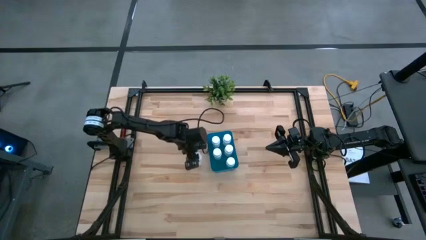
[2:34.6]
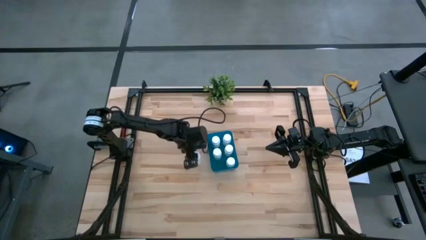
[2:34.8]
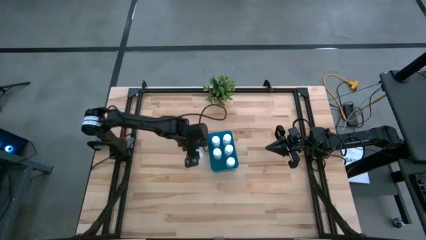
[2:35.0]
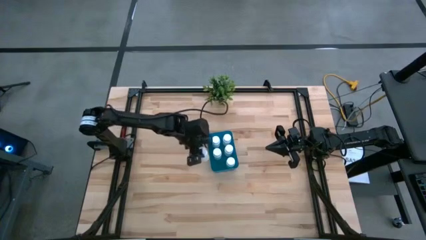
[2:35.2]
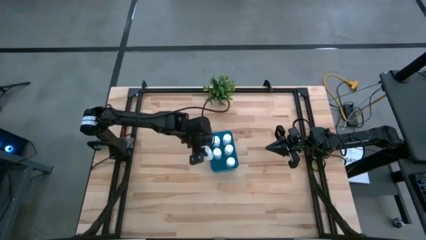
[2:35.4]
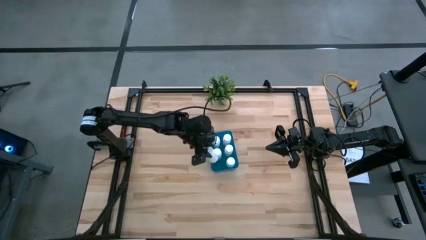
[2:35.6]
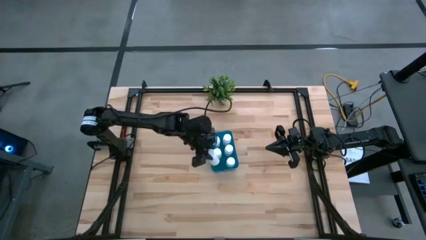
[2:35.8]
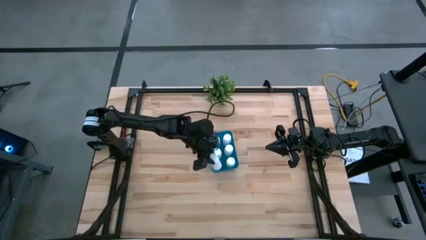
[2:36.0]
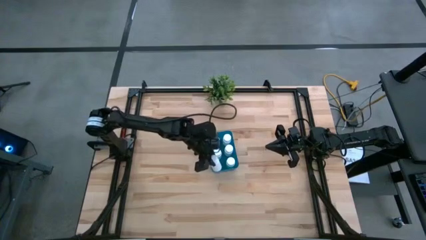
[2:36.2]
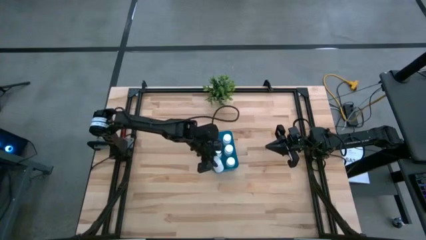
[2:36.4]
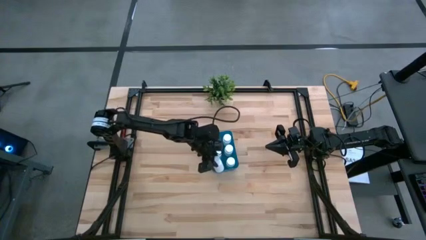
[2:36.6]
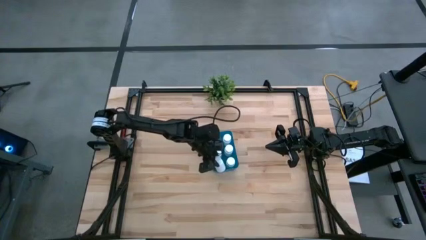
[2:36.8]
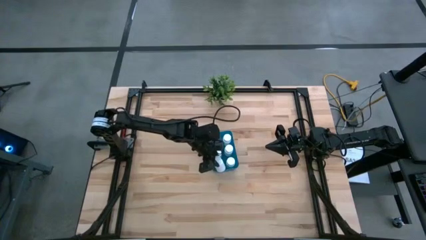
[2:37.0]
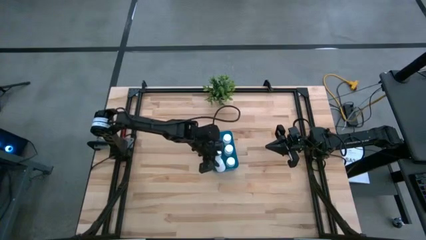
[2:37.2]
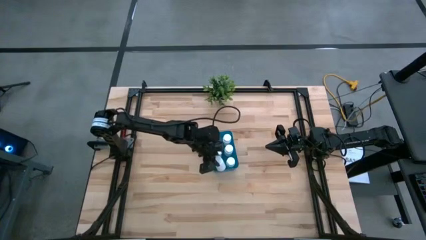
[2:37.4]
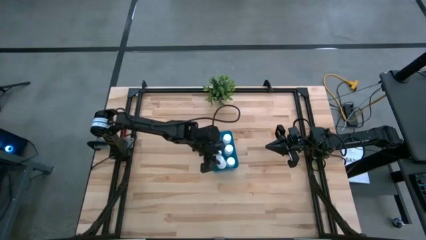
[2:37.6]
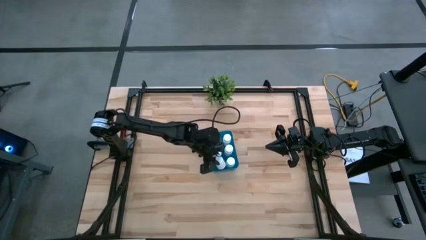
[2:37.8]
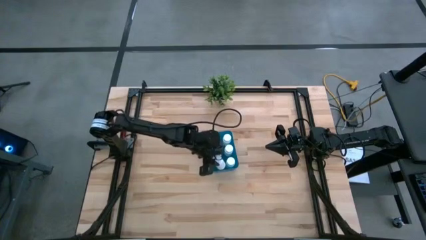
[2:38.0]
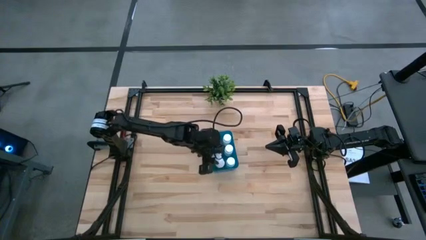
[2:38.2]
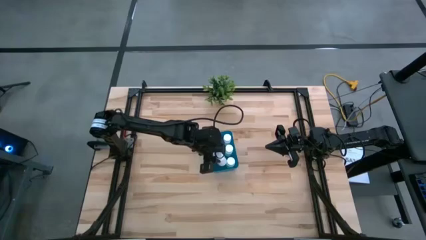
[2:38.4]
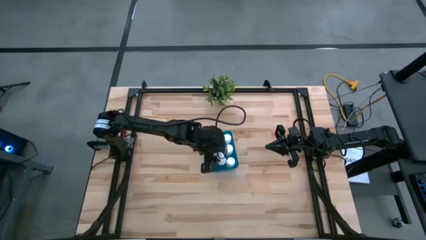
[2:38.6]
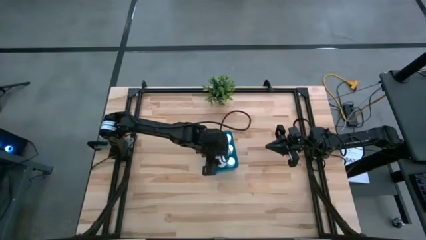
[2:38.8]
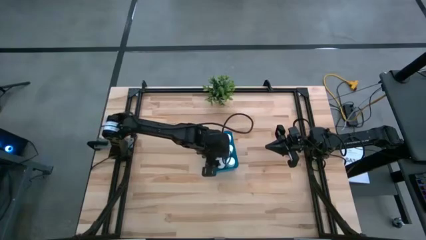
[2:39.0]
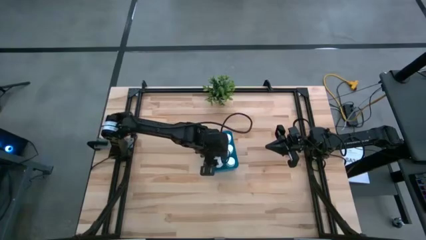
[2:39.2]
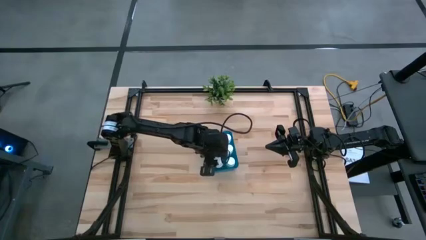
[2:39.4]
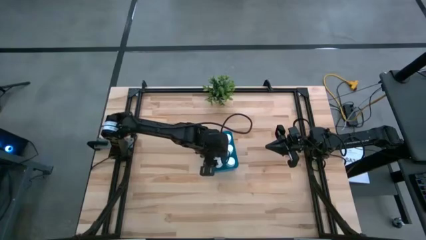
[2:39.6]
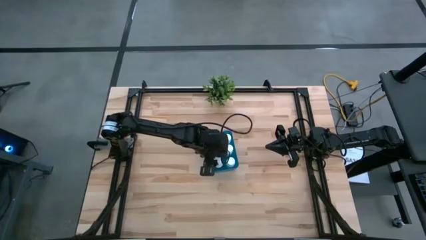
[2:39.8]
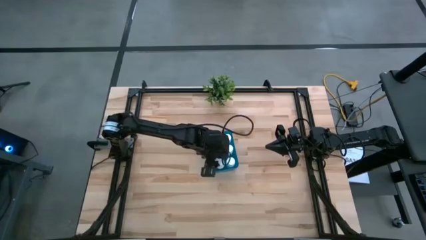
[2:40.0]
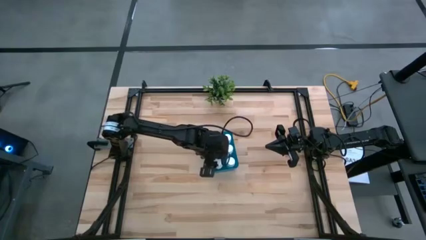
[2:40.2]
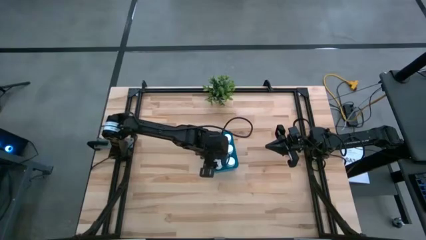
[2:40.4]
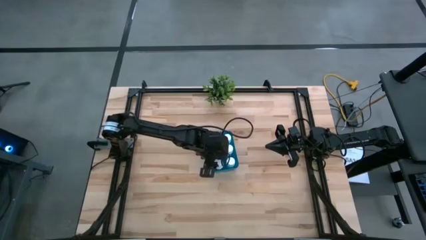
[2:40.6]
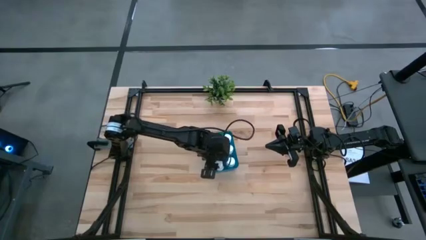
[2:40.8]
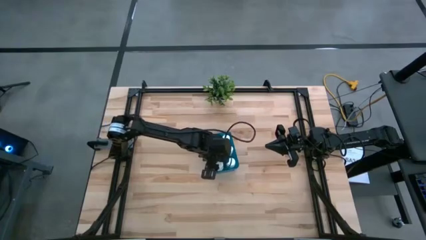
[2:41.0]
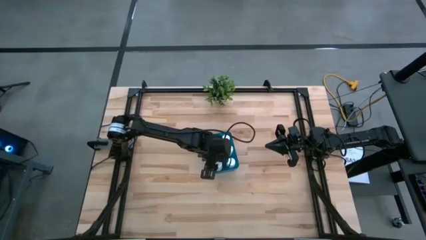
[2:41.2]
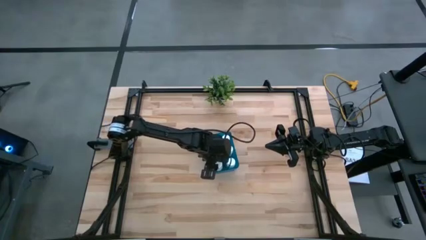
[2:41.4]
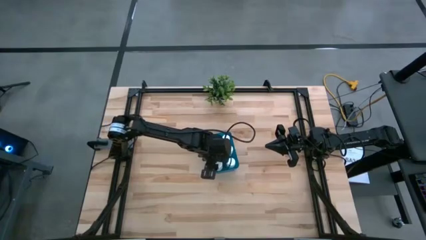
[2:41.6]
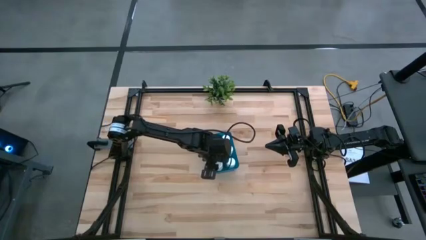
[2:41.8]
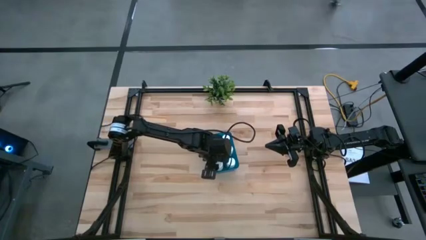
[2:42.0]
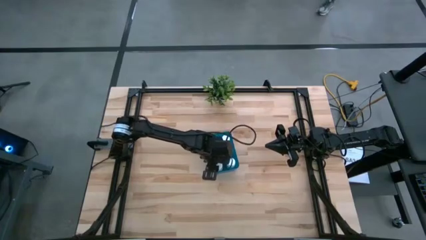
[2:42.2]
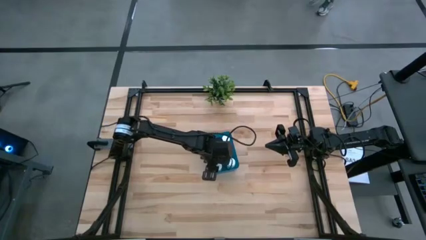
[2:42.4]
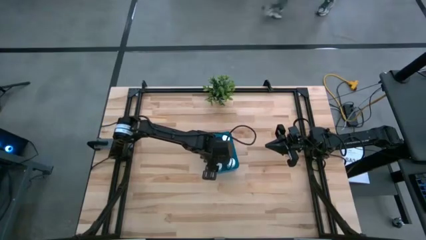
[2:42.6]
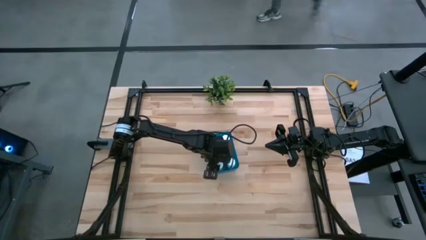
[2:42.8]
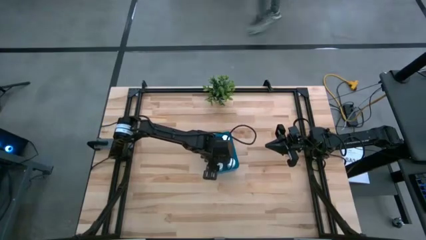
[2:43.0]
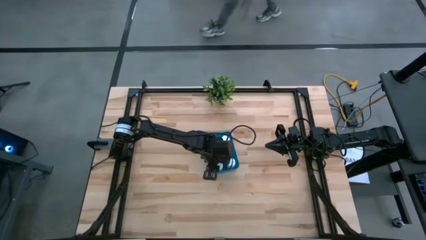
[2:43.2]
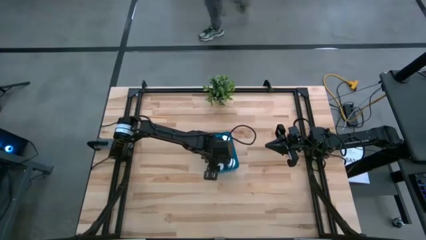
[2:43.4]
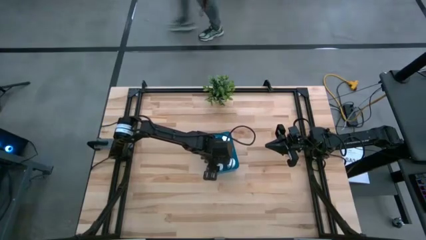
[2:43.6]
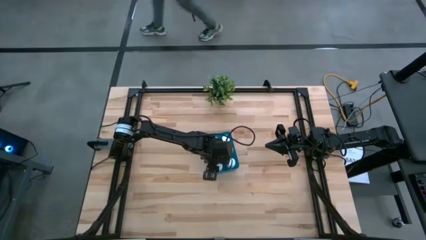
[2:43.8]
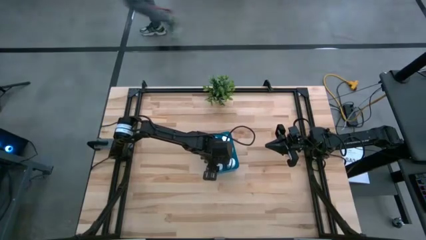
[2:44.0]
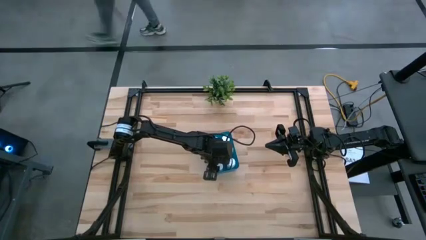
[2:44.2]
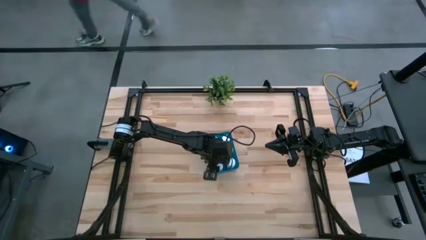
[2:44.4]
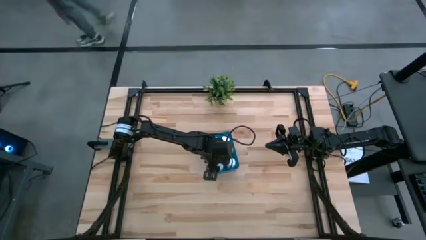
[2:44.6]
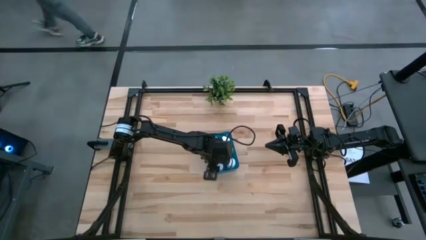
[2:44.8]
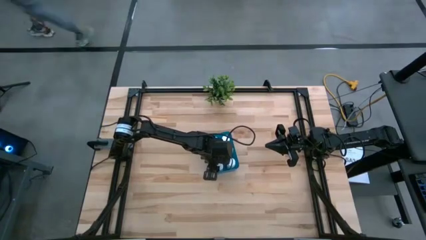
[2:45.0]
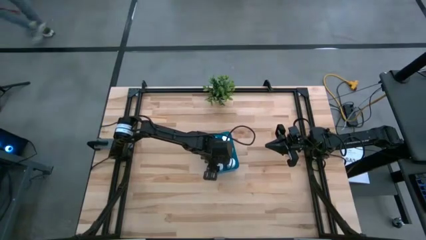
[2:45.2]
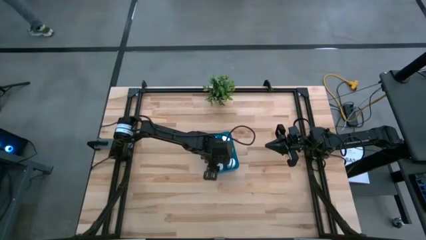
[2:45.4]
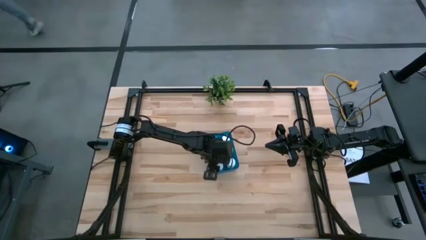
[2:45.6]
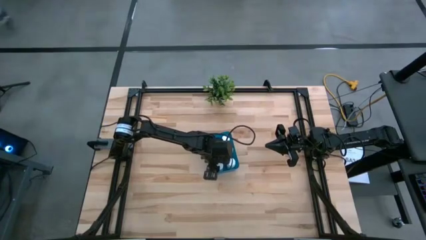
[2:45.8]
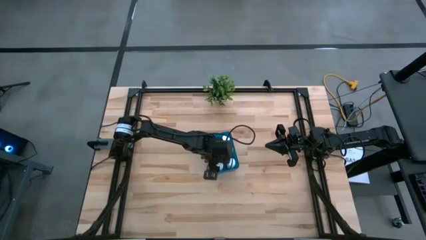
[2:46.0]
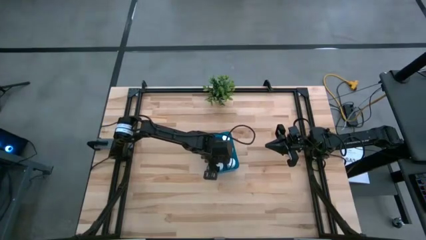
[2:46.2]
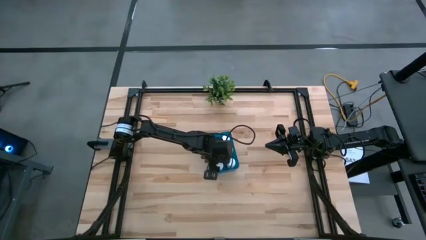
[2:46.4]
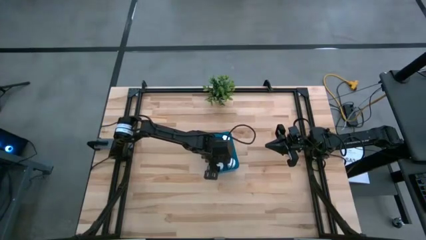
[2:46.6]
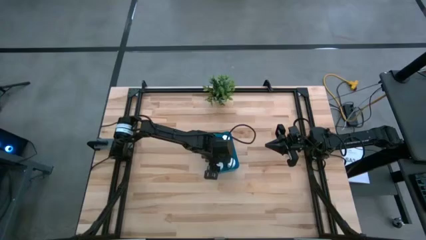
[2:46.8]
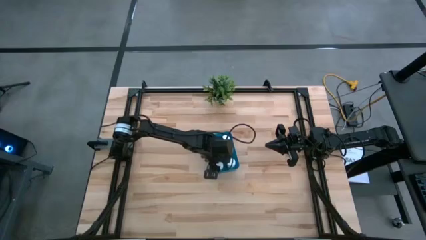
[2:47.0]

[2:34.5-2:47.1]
Task: Pick and place pill bottles into a basket
Put the white medicine bottle into the blue bin
